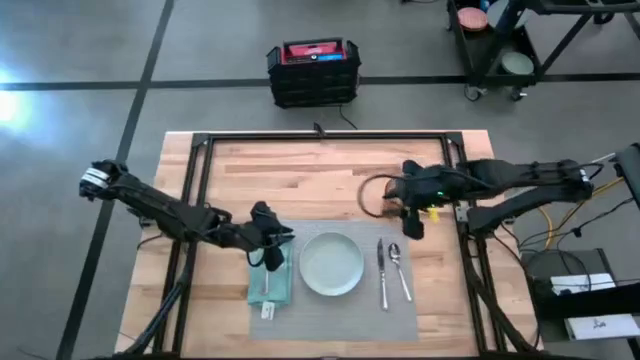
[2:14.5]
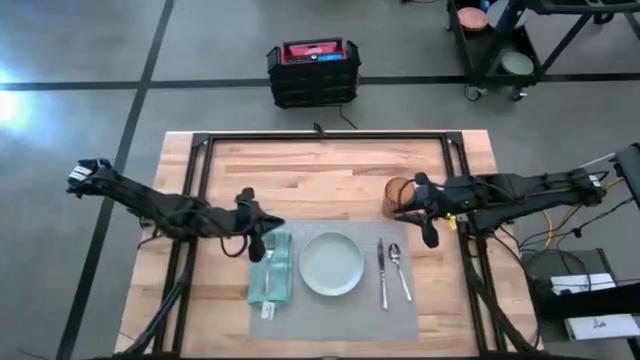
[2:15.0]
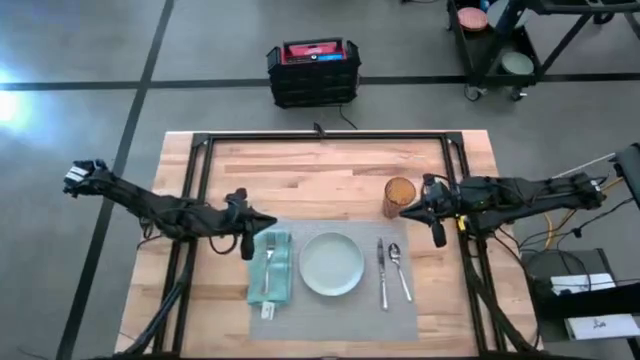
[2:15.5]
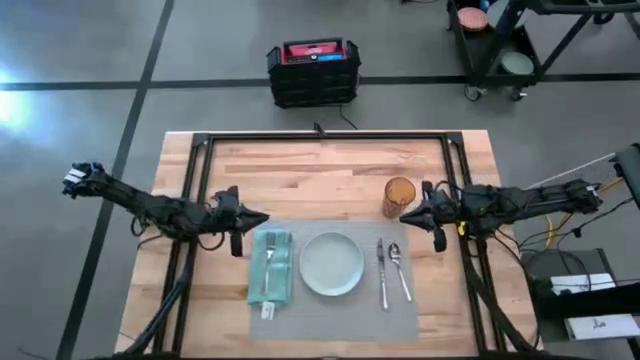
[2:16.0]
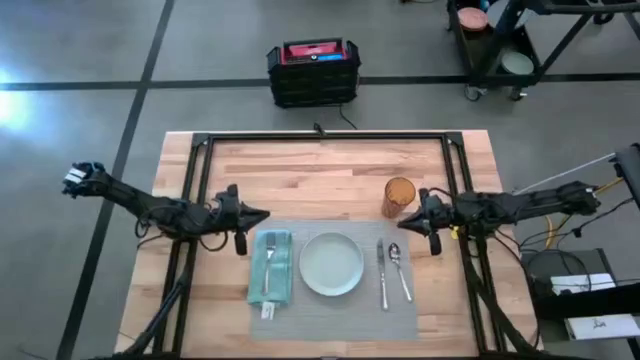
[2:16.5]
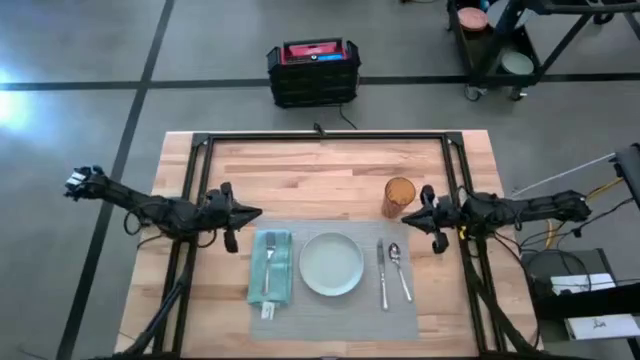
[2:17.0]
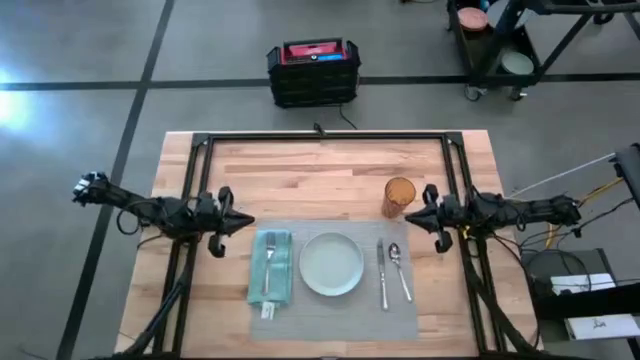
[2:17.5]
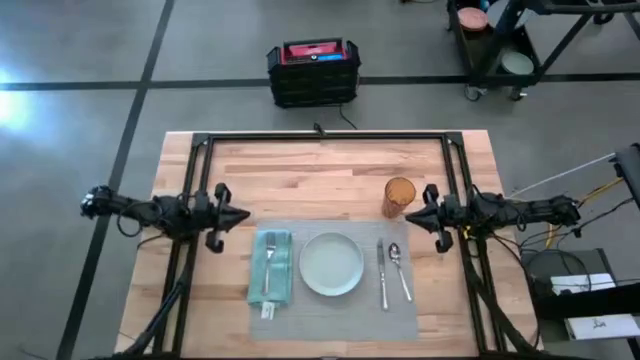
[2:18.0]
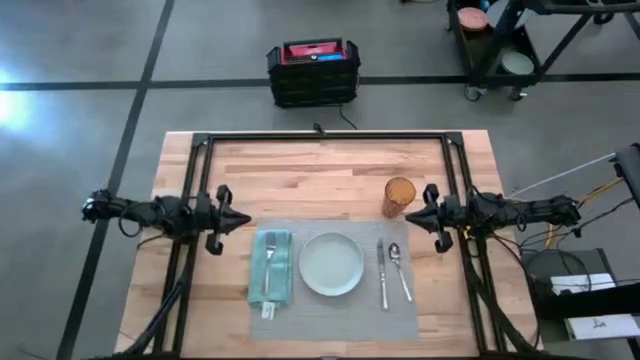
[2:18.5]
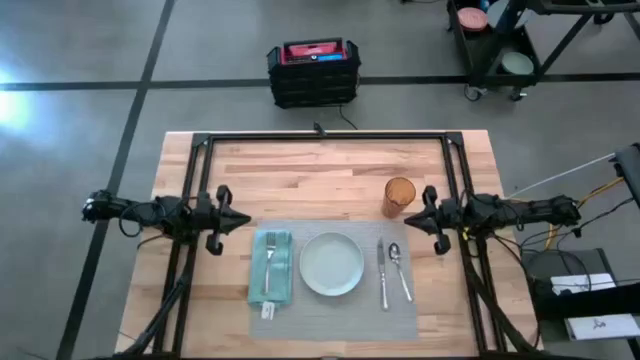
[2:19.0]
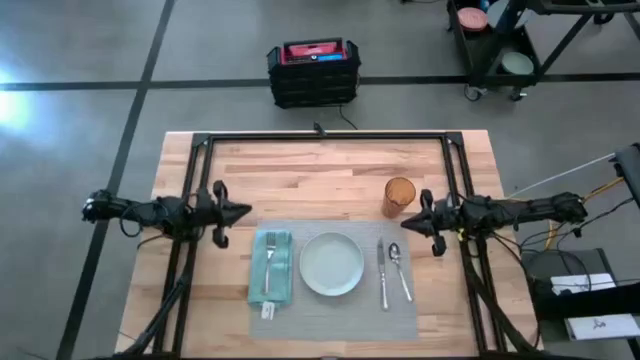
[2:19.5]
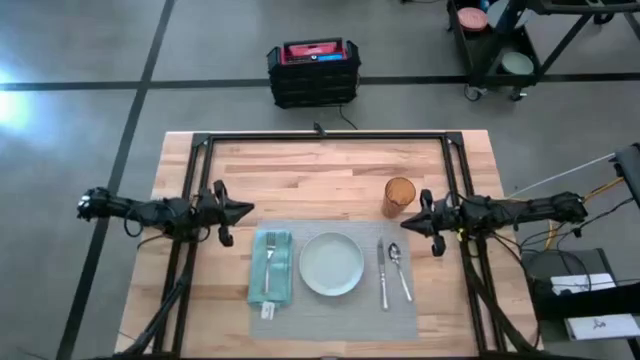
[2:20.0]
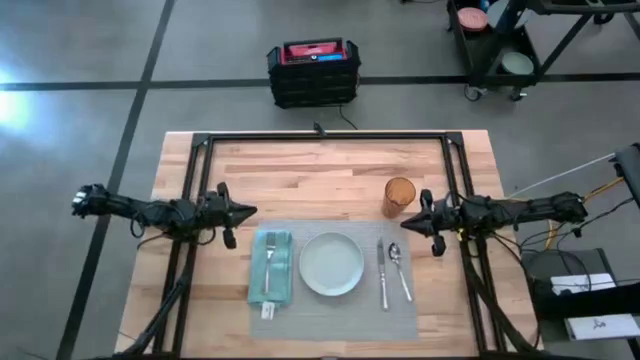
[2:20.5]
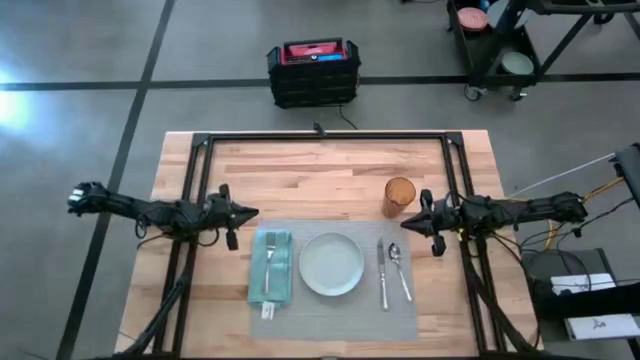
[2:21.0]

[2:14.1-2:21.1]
Task: Set table place
Return to home position

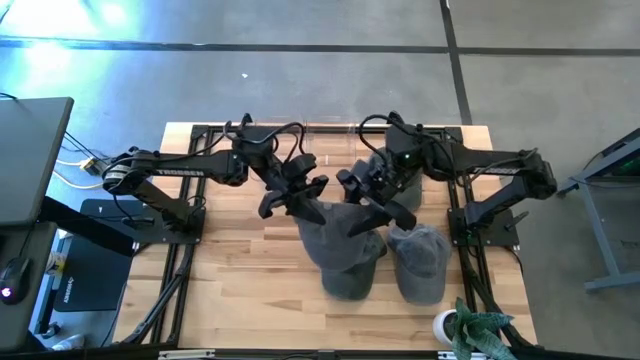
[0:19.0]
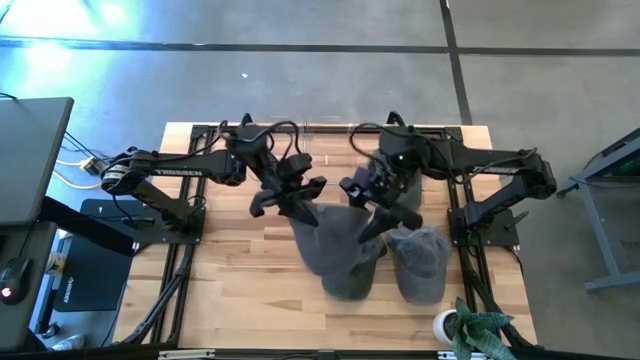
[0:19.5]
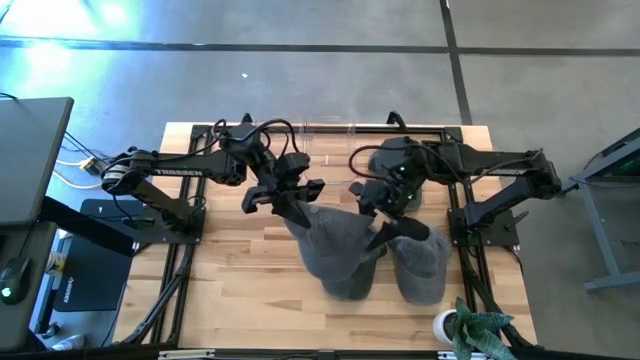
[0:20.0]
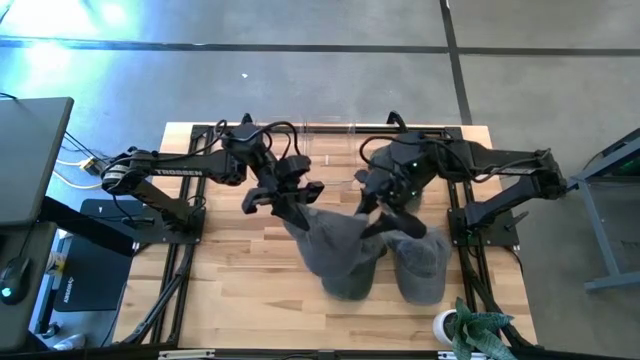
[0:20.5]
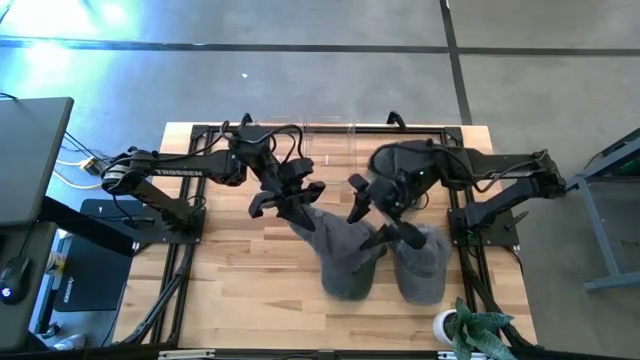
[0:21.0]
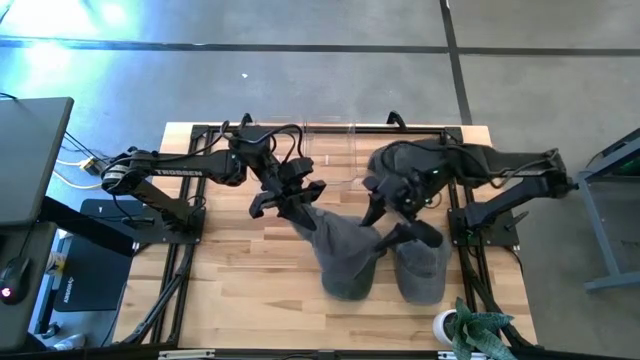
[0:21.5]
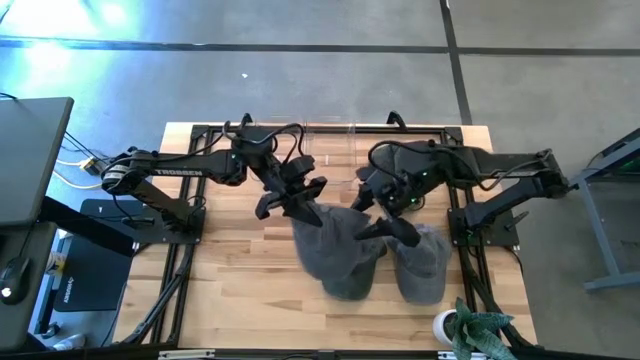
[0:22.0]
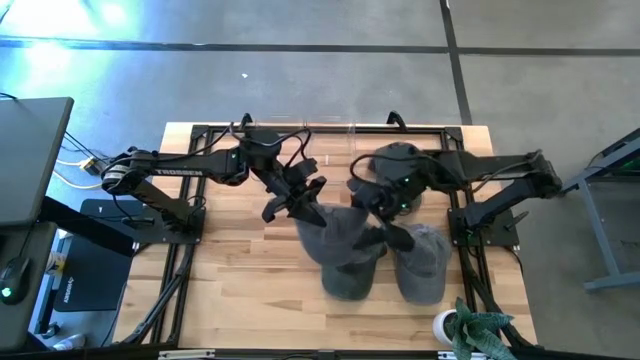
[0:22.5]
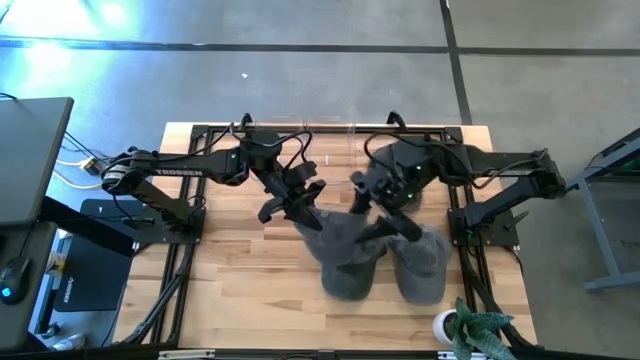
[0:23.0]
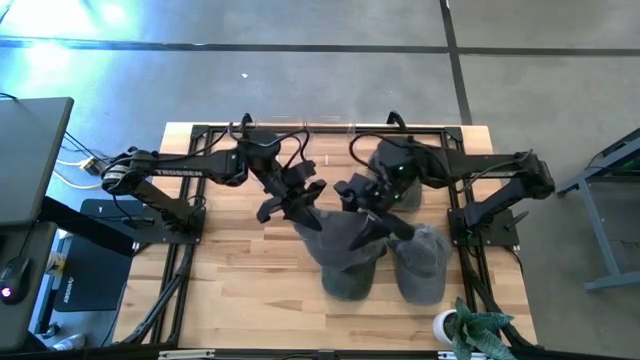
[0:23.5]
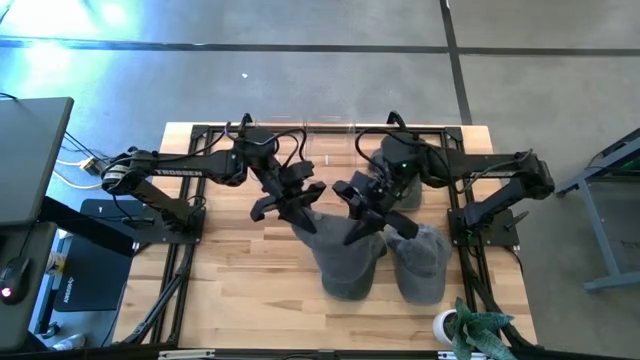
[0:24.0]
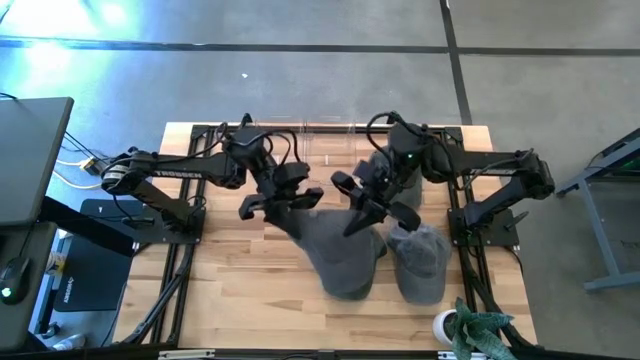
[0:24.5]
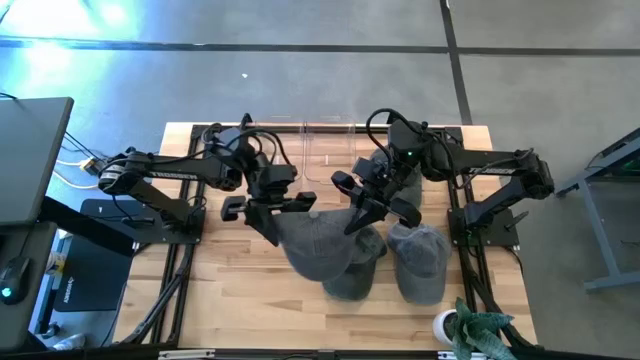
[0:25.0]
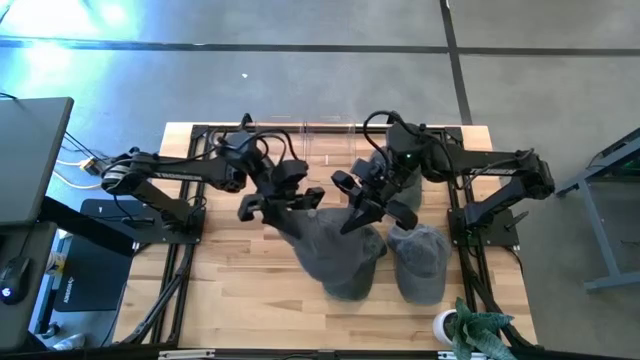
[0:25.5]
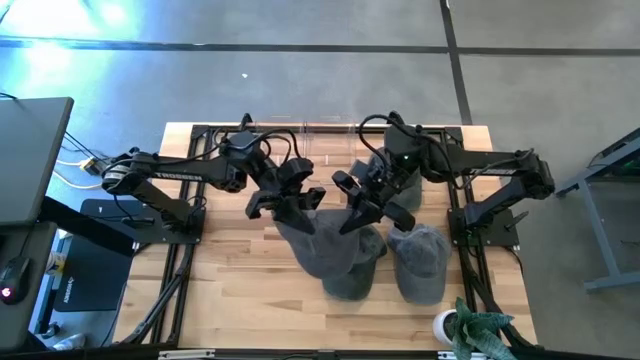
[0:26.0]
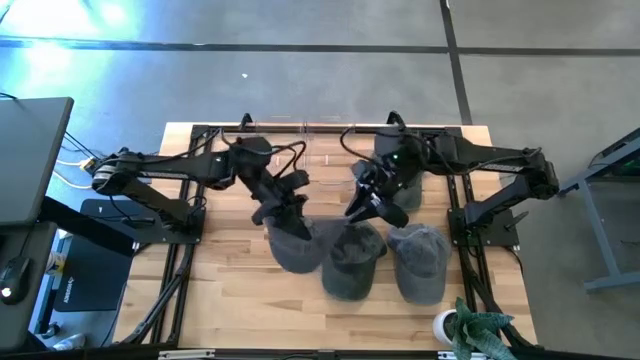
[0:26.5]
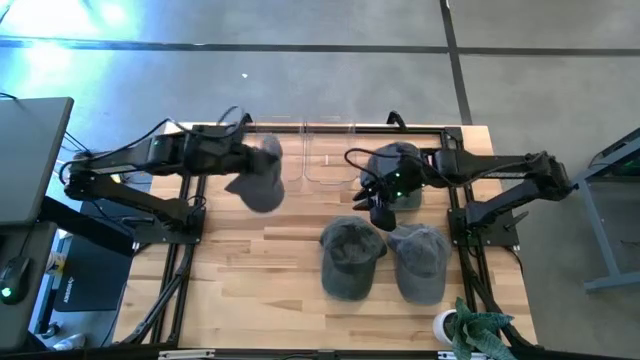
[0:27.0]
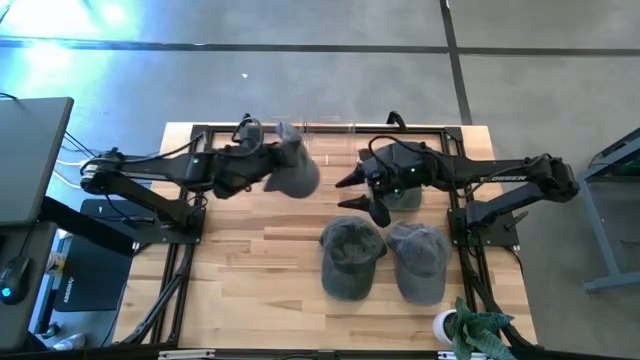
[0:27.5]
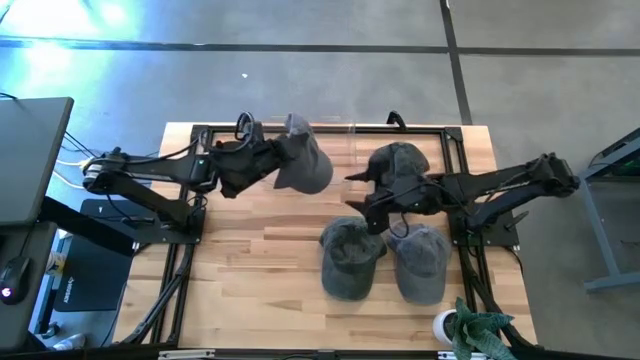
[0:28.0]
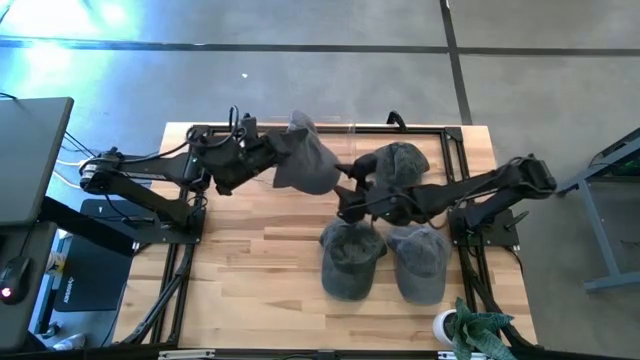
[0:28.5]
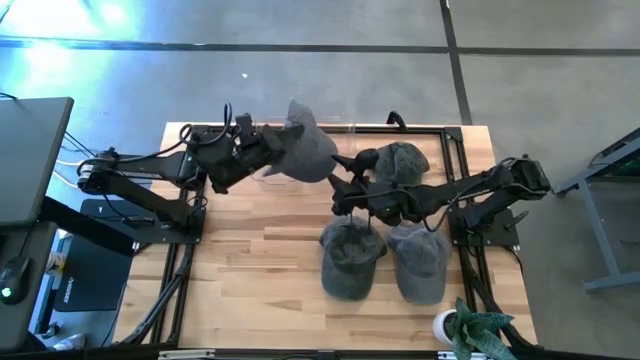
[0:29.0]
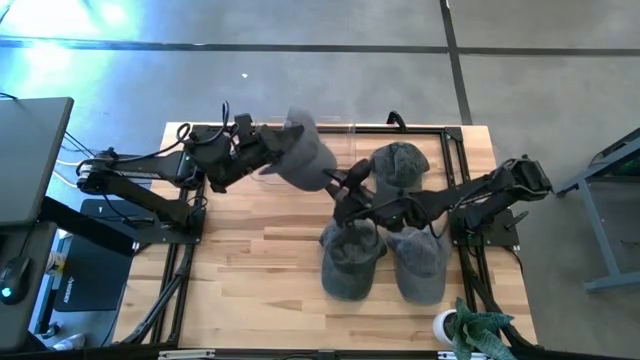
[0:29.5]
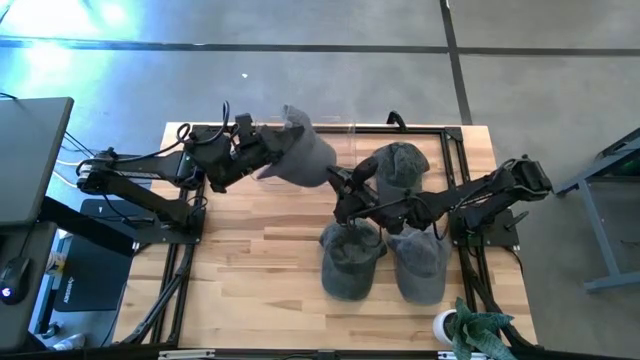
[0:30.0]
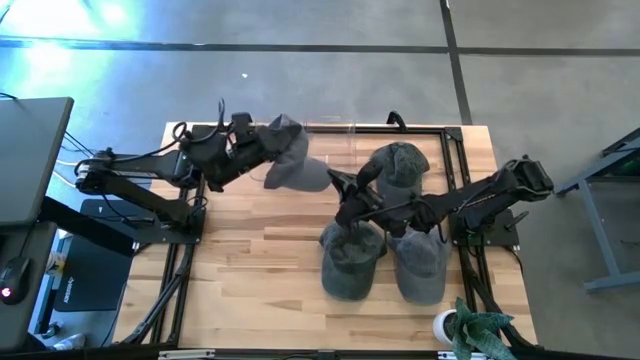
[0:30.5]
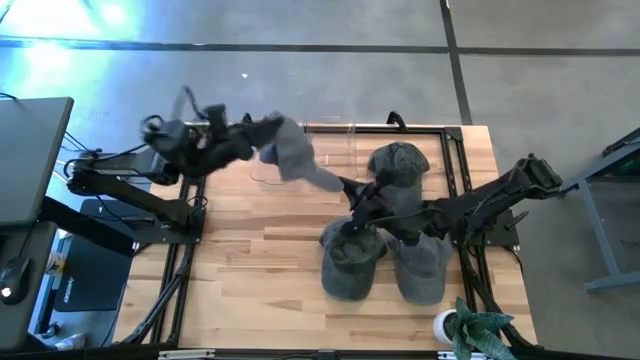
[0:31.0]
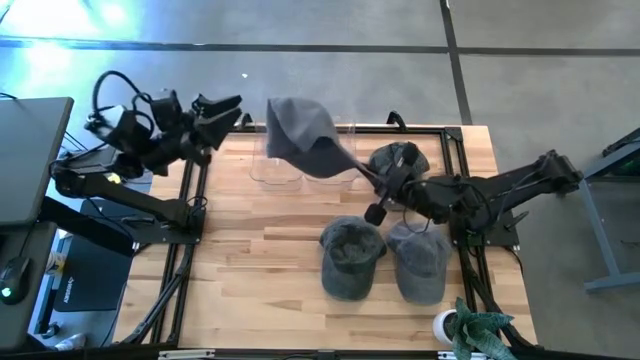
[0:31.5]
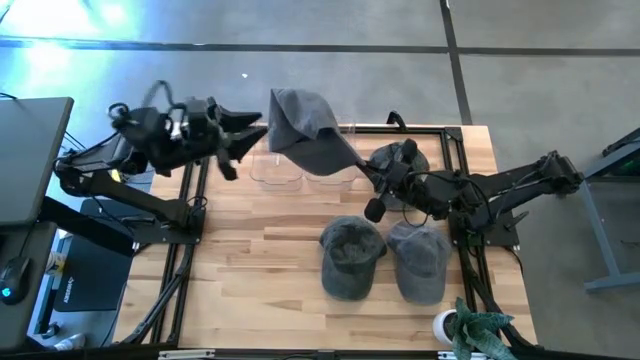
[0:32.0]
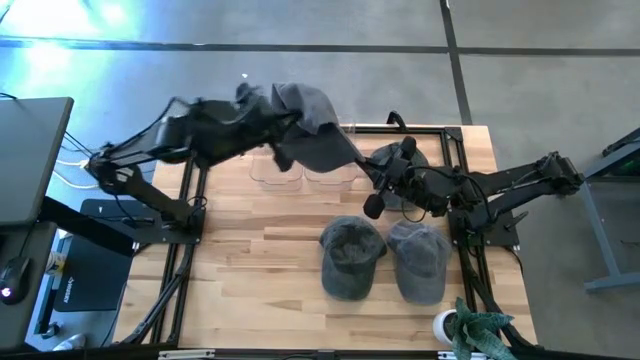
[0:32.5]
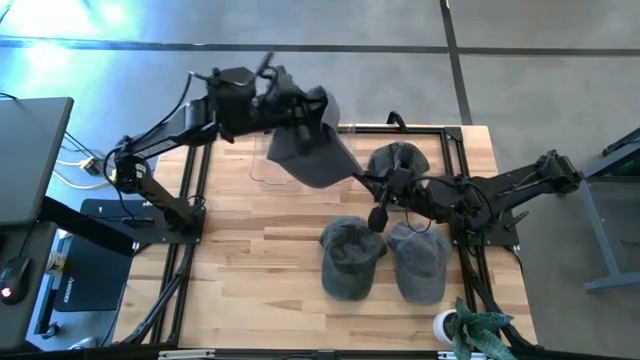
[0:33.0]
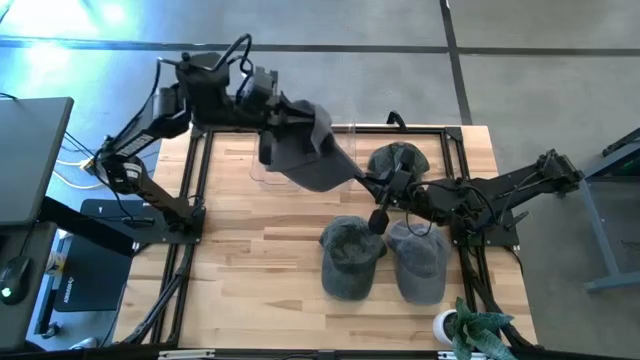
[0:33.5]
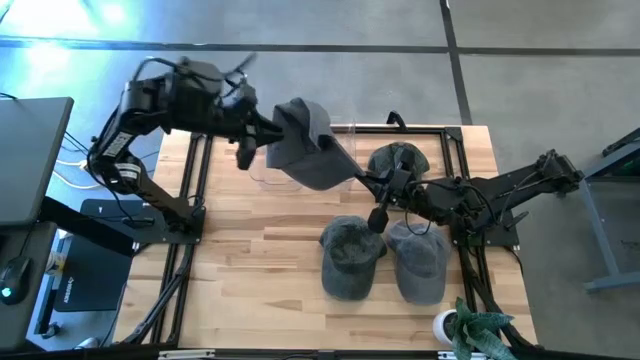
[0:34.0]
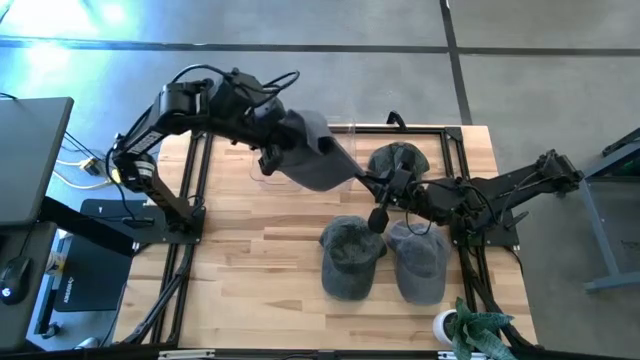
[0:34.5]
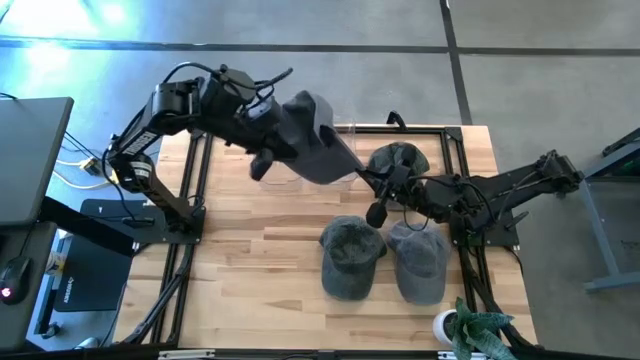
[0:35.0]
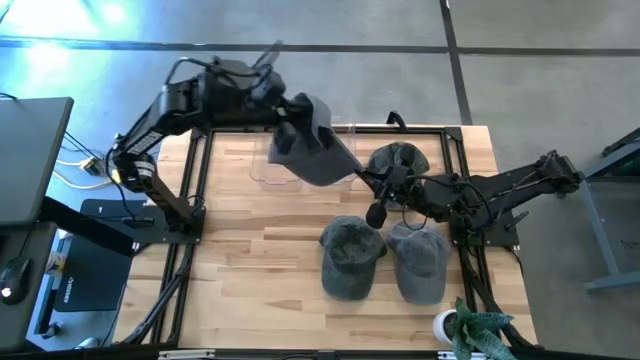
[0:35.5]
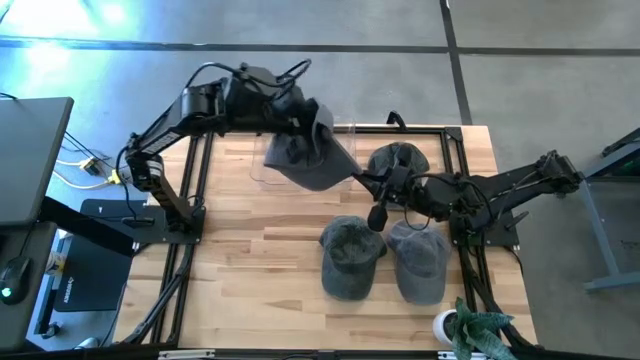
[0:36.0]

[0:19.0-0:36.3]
Task: Pick & Place hat
Put the left gray cap into the left transparent bin
